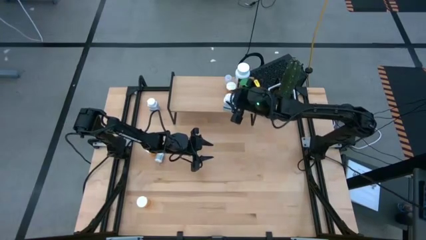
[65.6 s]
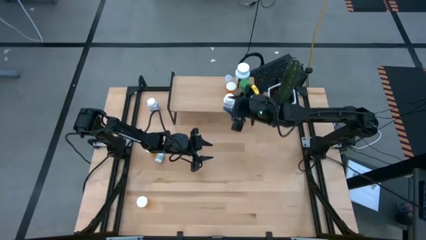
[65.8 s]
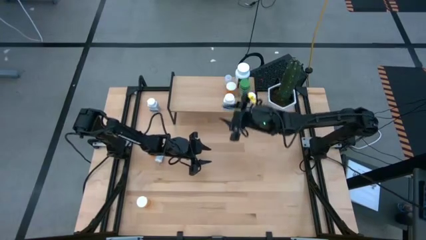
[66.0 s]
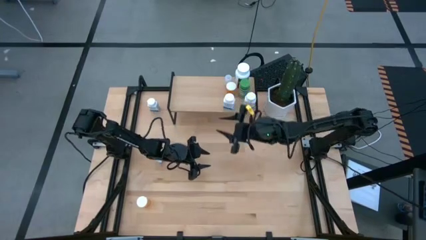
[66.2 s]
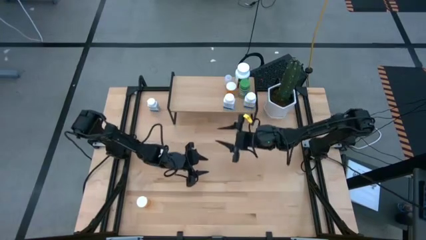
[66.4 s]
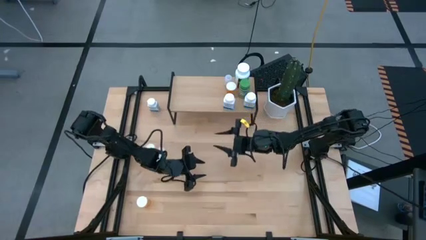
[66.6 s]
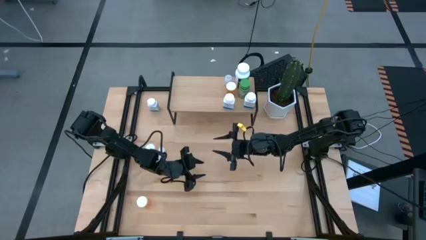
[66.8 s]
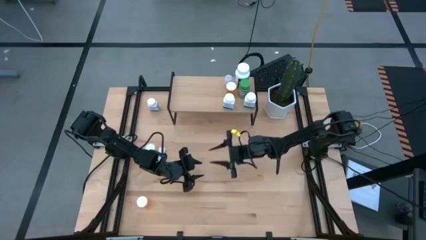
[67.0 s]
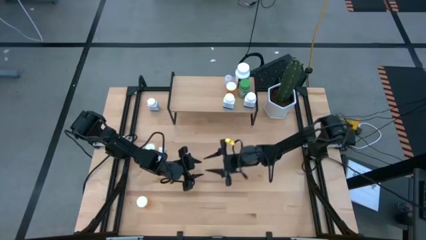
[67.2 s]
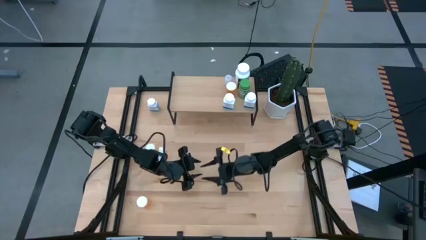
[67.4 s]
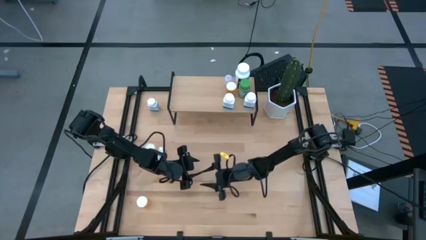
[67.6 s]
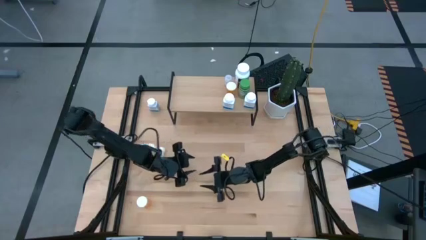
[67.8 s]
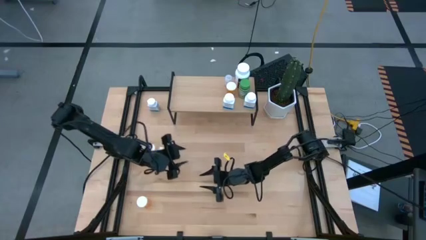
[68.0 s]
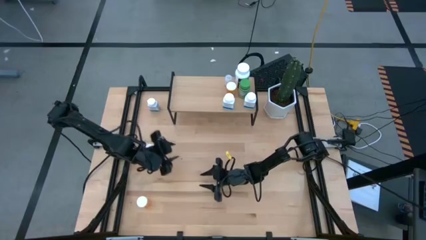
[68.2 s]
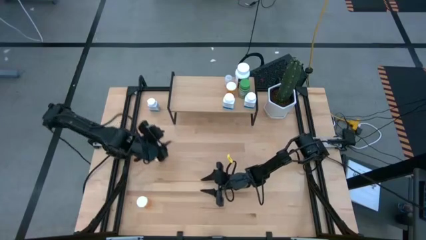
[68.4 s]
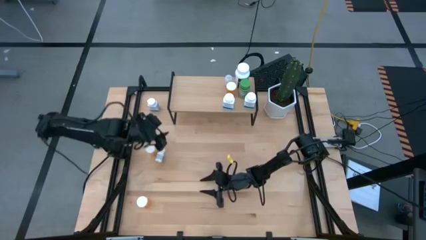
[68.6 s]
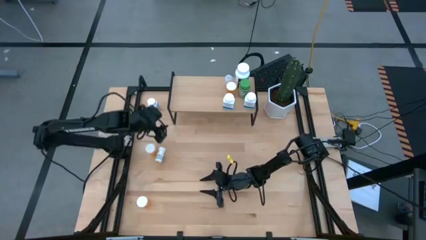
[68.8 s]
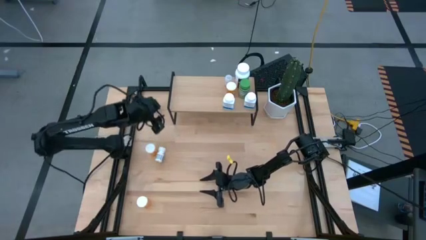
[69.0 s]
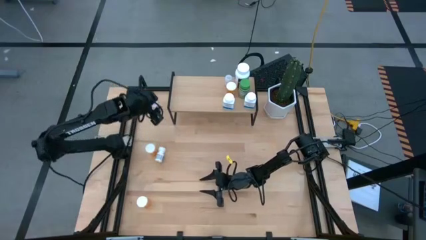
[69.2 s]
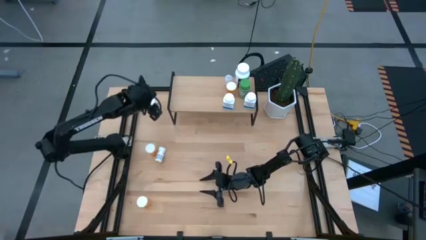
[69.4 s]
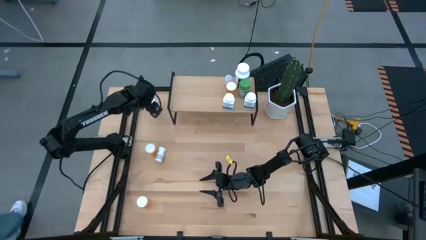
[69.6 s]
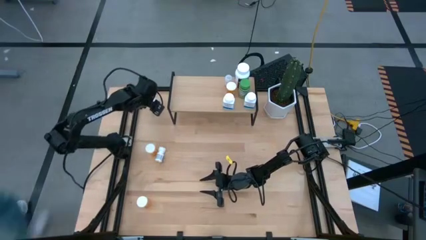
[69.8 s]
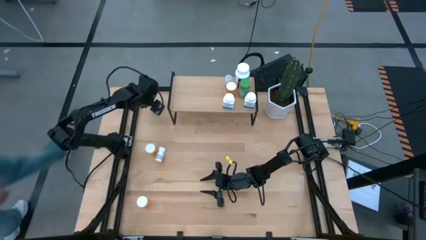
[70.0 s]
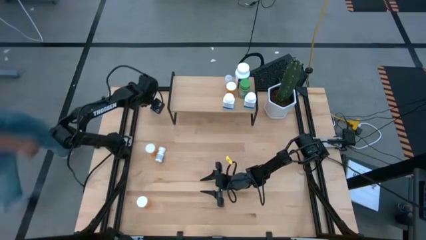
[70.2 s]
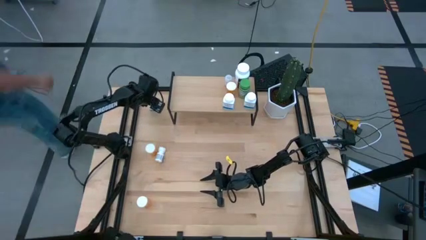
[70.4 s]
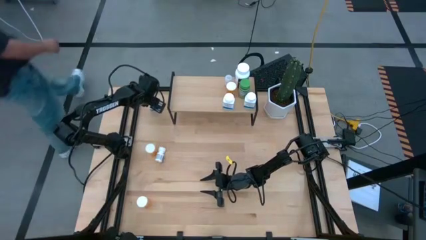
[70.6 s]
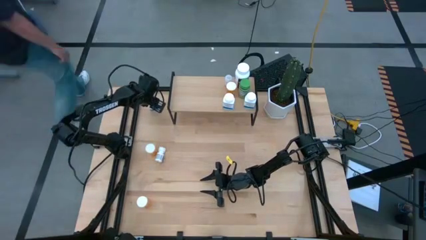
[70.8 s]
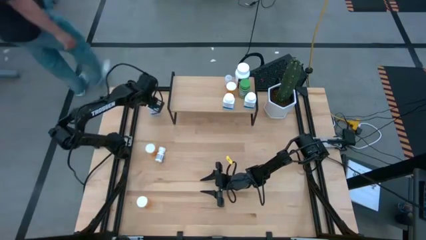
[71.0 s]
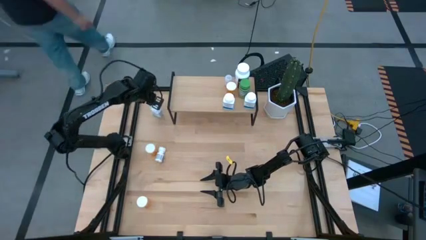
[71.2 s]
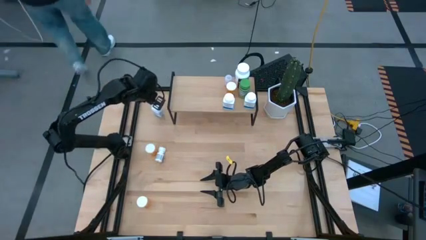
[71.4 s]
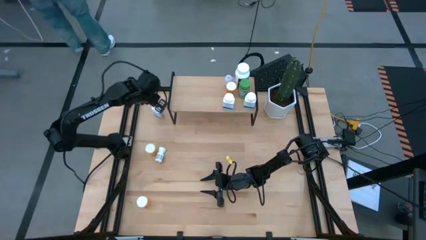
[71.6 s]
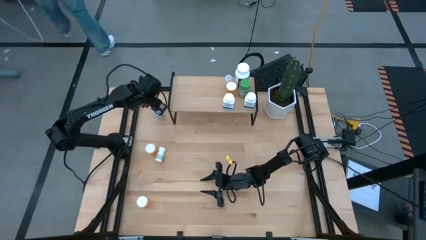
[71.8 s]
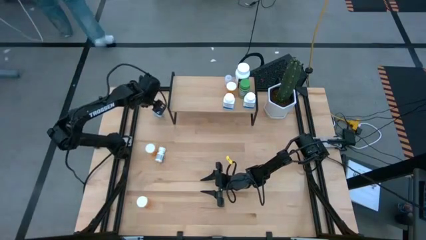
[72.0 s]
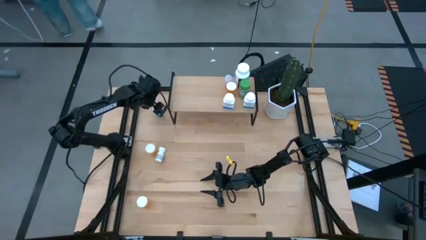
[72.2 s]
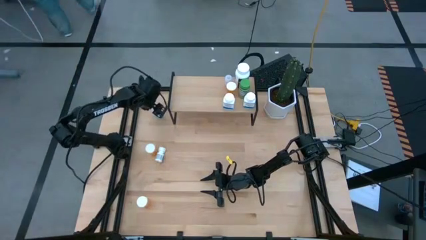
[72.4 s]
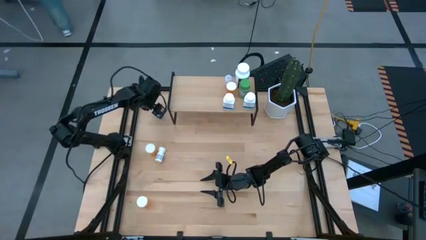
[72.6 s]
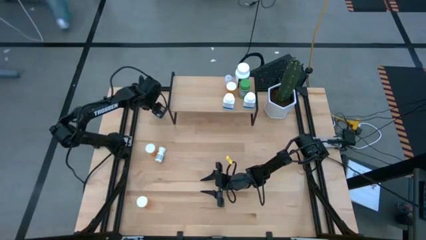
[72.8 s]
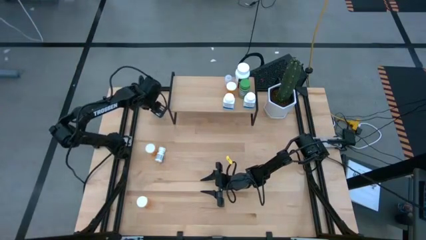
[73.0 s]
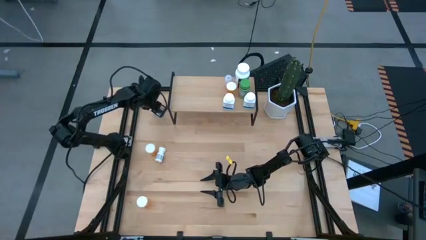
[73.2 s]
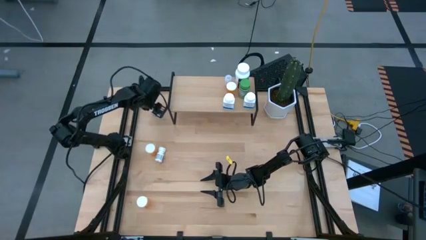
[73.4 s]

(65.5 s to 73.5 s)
Task: Pick and place medicine bottles onto shelf by color
Put the top white blue pill bottle on the shelf

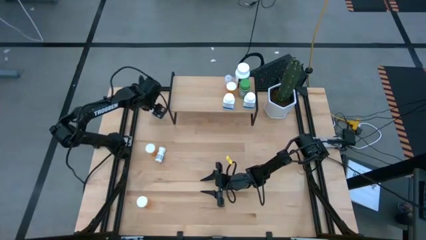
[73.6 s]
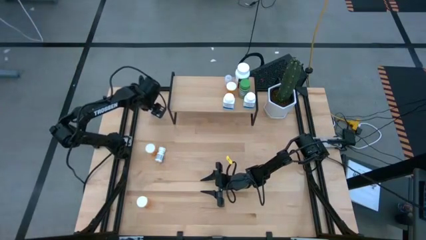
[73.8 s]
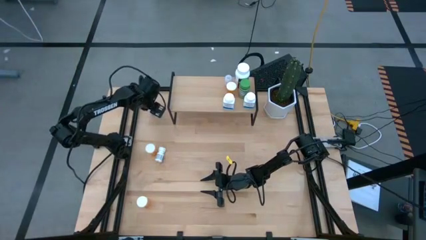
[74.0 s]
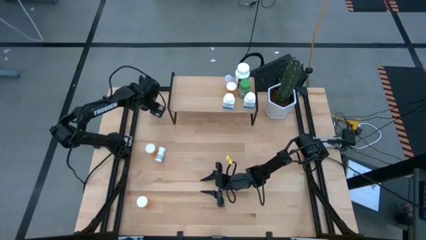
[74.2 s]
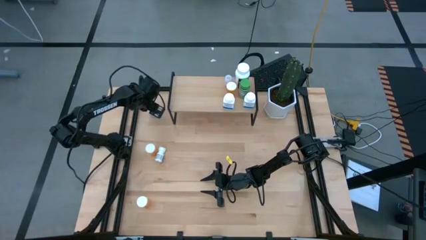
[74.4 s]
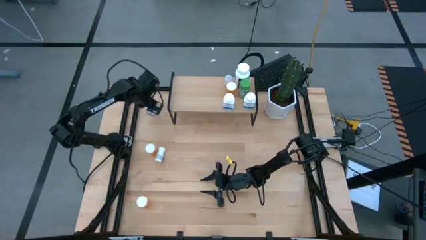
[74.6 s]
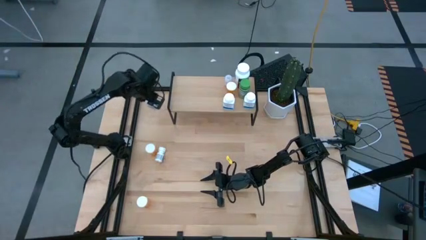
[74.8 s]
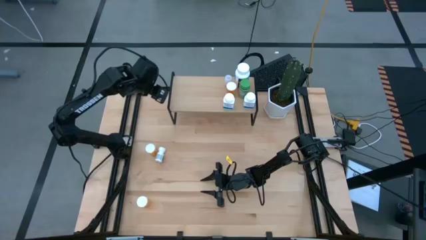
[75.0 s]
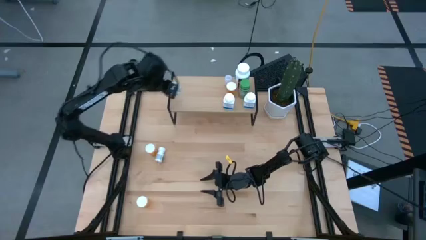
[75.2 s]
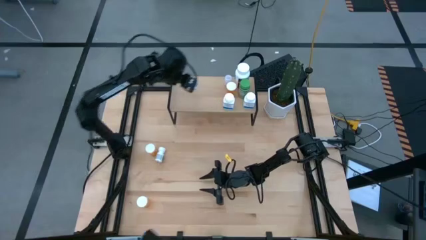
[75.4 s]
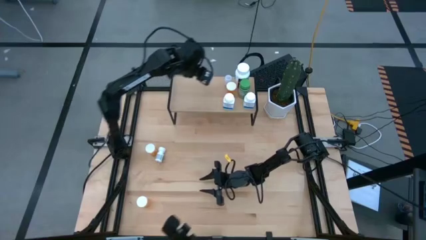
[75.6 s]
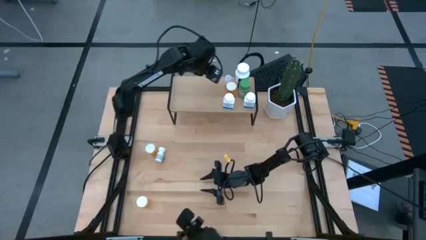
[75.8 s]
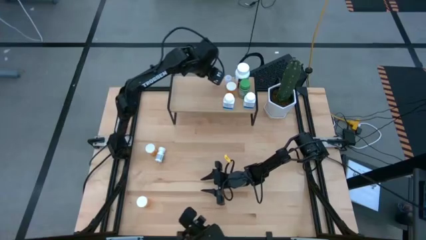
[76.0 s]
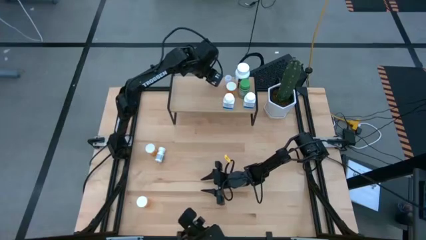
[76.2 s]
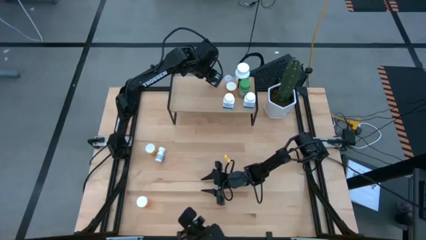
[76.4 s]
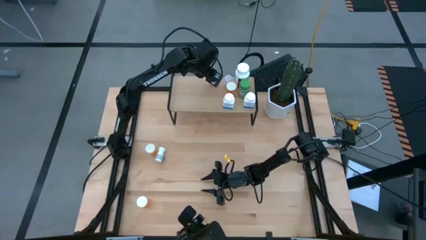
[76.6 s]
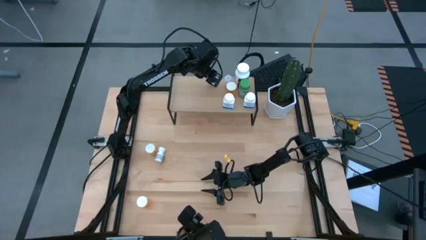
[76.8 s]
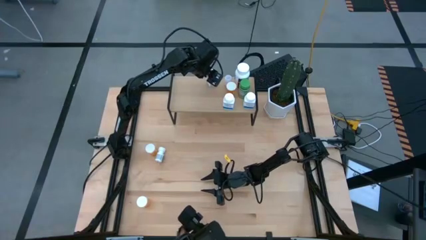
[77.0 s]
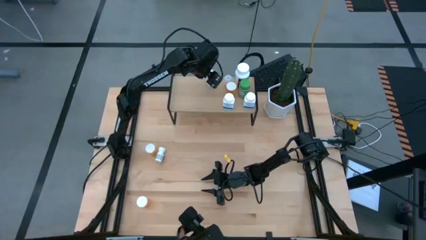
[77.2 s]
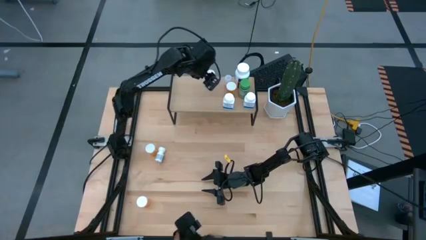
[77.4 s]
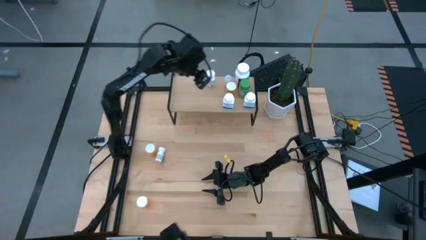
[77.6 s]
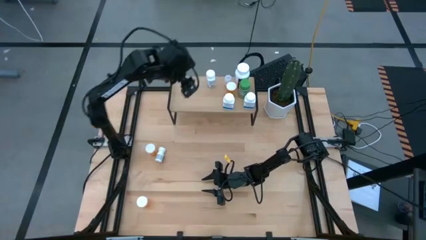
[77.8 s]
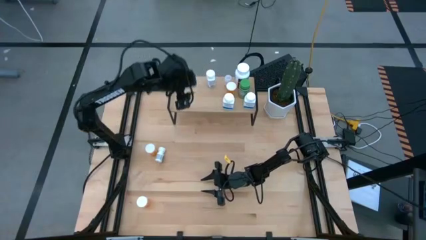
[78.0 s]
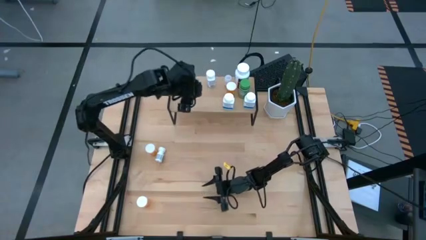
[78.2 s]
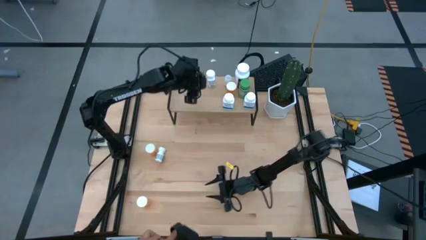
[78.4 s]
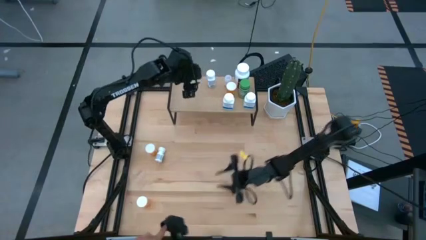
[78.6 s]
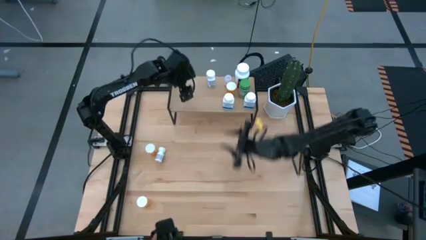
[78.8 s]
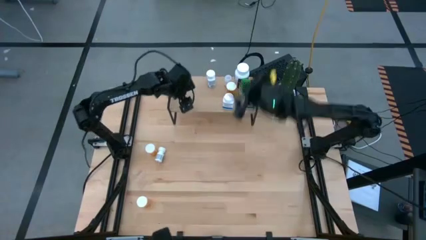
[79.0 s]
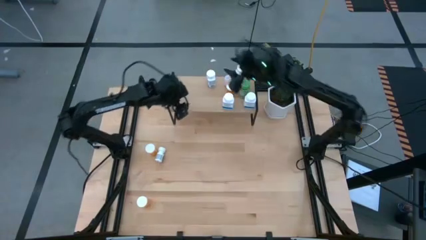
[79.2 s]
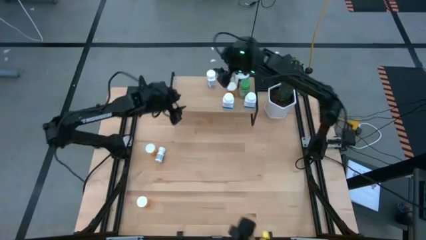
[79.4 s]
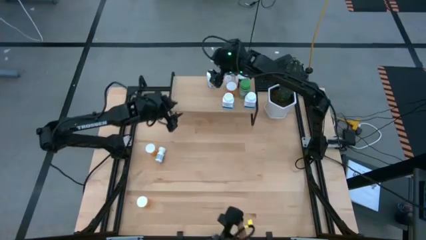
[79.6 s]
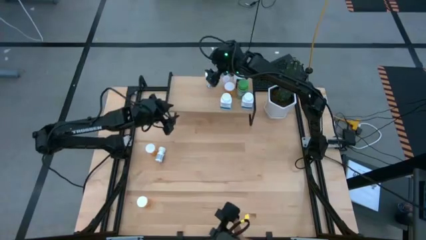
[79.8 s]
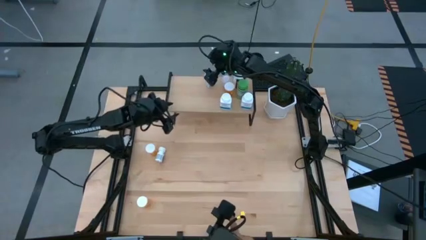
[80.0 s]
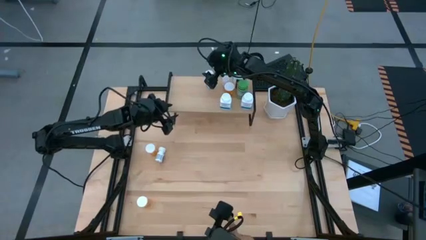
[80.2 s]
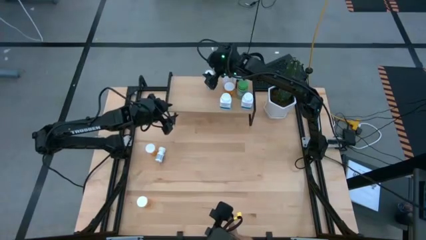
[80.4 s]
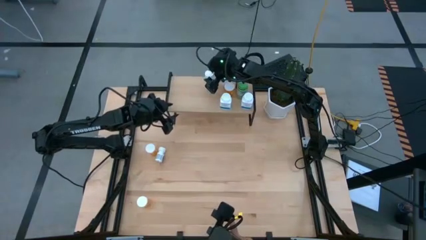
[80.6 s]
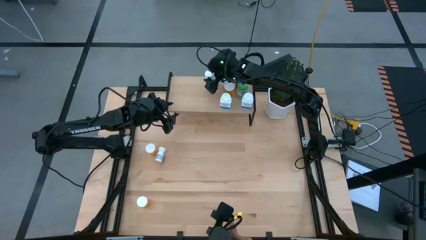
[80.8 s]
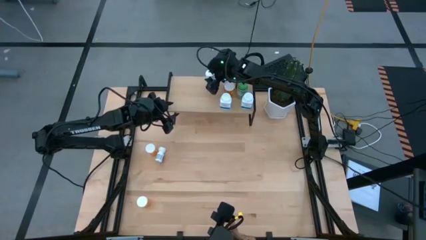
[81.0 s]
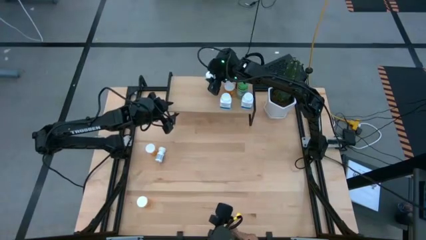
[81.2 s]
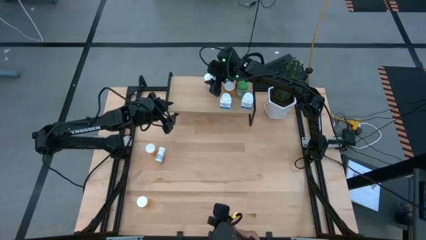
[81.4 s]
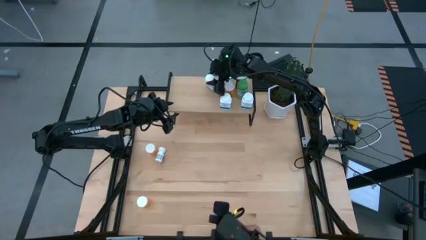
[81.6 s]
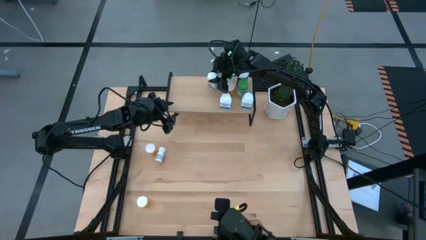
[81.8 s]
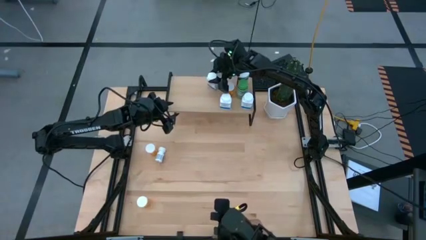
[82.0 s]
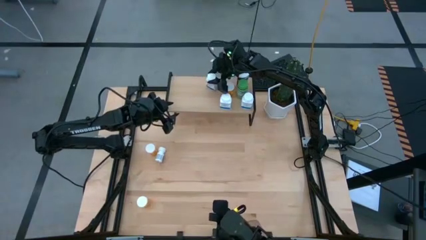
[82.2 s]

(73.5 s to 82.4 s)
Put the top white blue pill bottle on the shelf

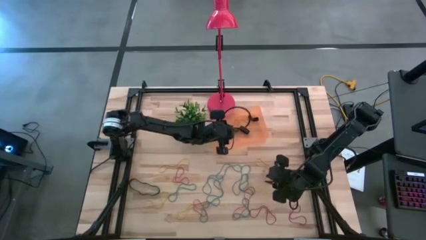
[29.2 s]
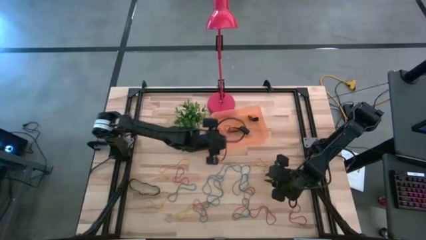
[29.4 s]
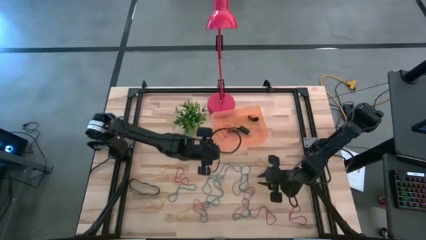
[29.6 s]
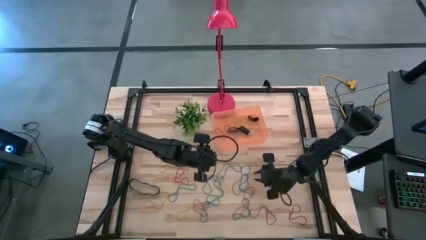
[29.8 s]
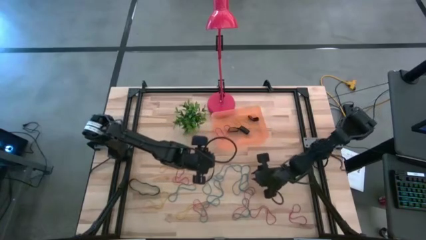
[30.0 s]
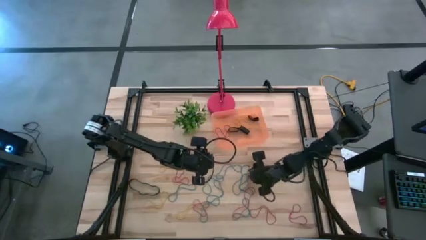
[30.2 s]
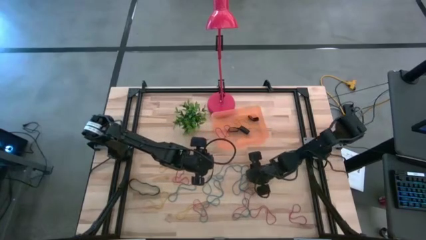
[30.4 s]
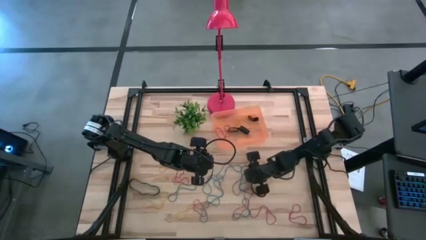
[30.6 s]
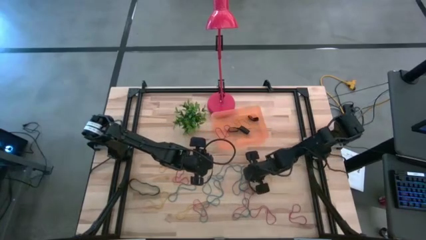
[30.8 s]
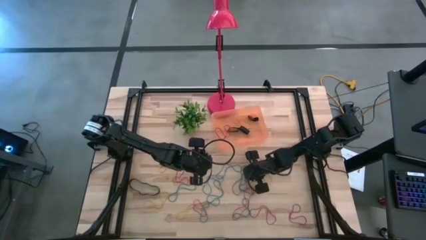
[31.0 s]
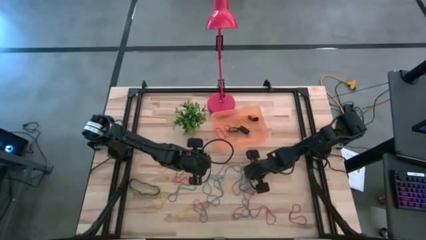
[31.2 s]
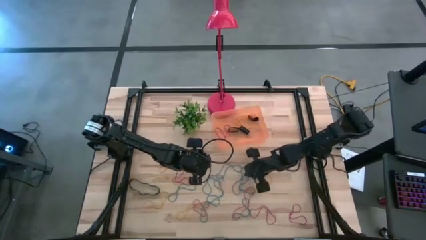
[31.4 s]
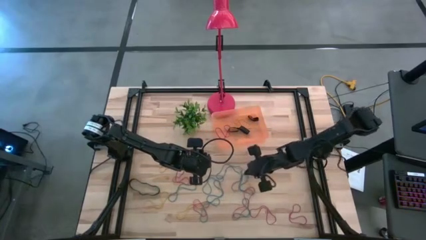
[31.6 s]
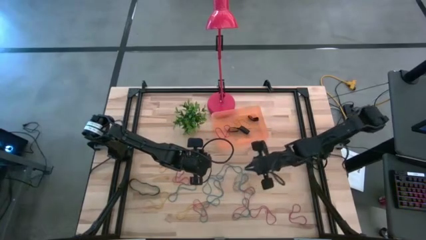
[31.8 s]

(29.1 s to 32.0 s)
Task: Pick and place rubber bands into bin
Put the blue rubberband into the orange container
